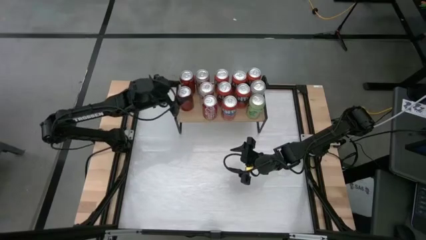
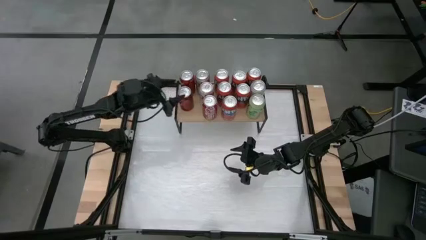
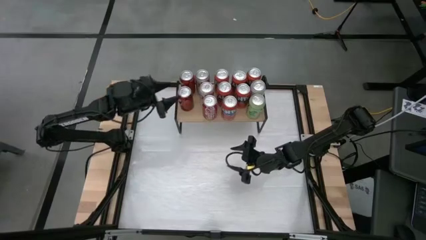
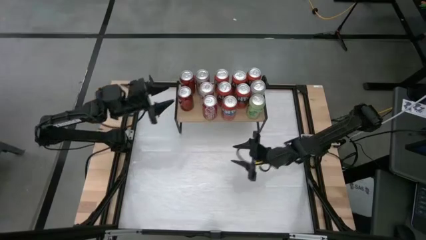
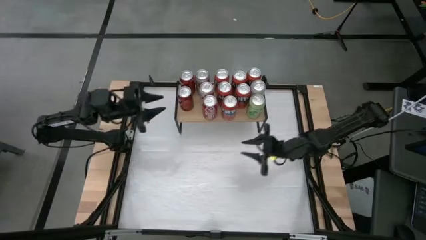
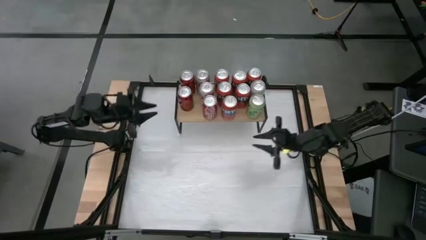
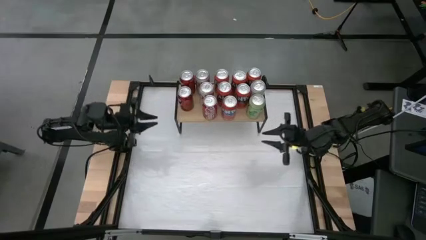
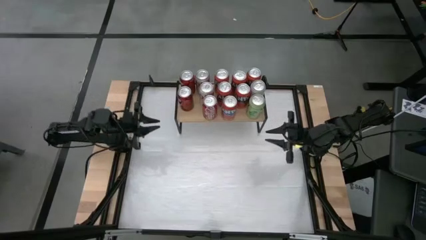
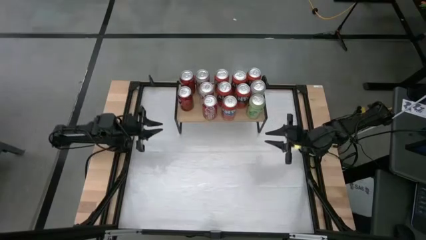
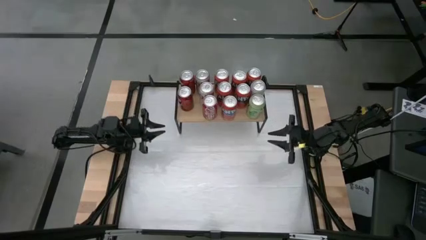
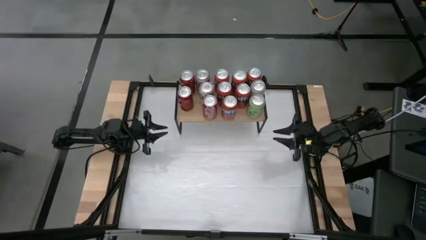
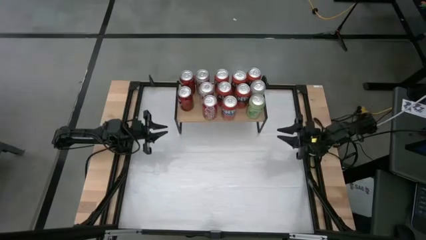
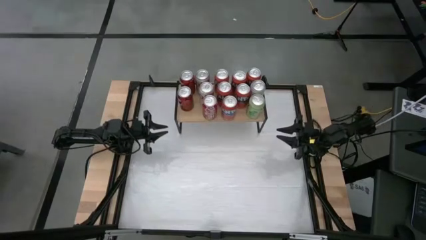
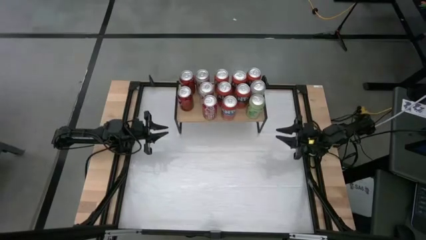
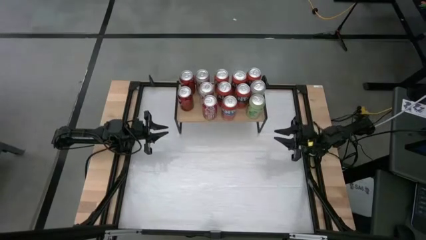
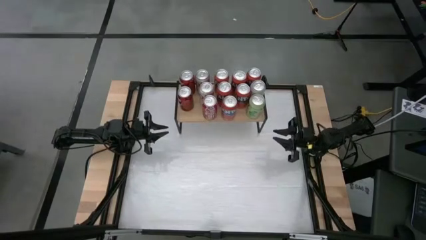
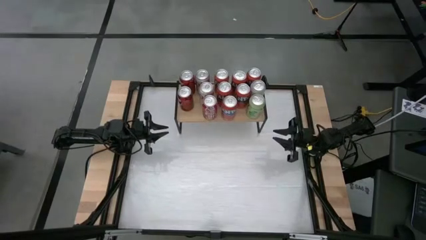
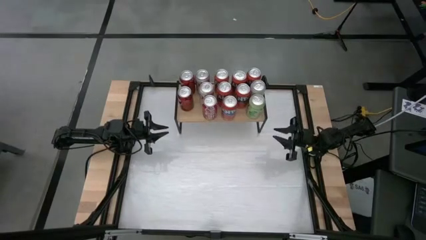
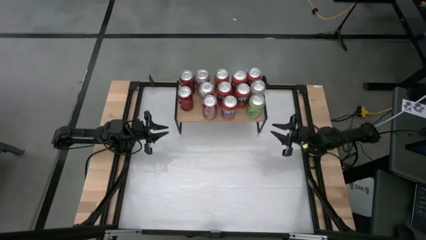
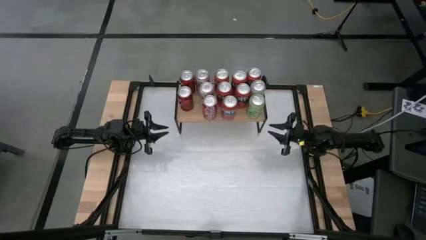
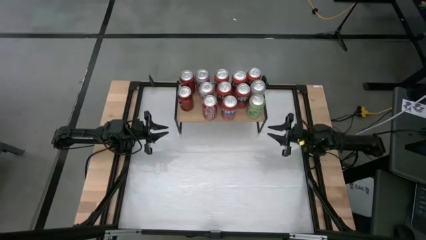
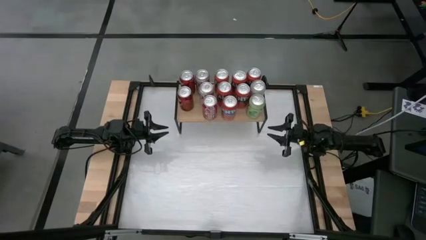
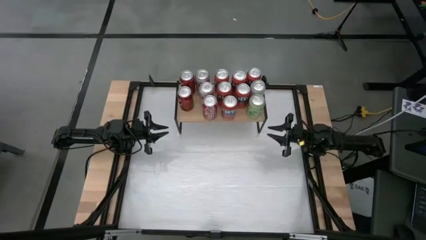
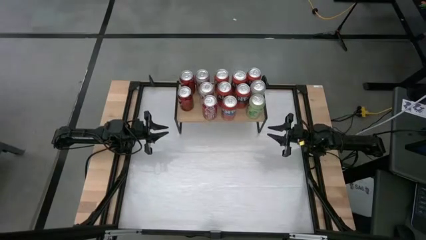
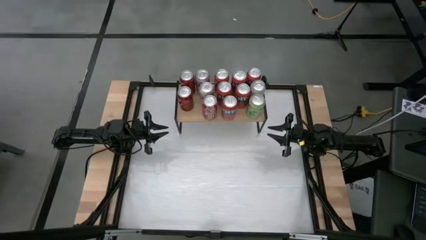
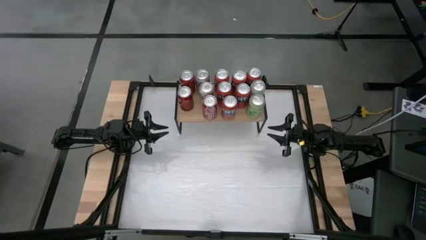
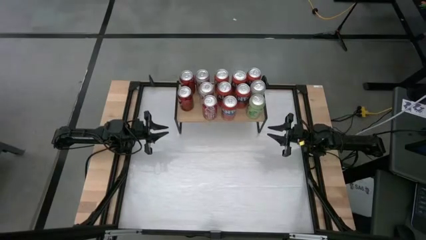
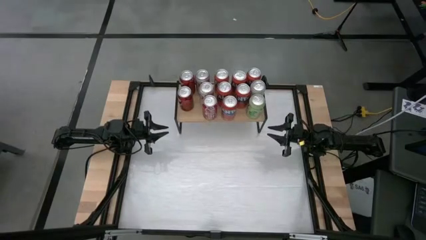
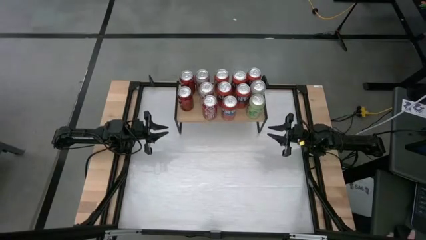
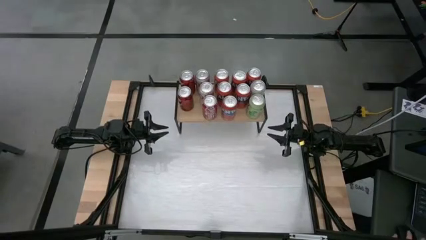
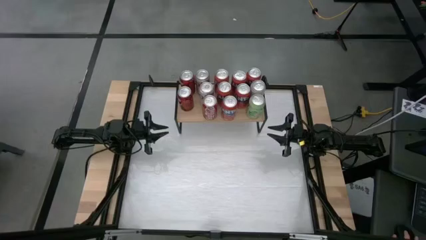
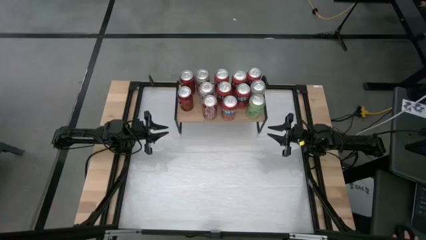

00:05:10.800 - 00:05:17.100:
Task: Place canned beverage on shelf
Return to Home Position

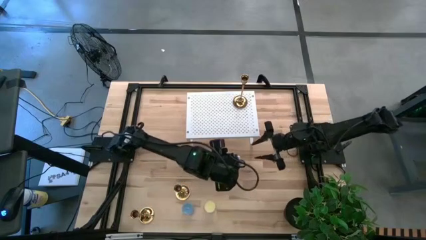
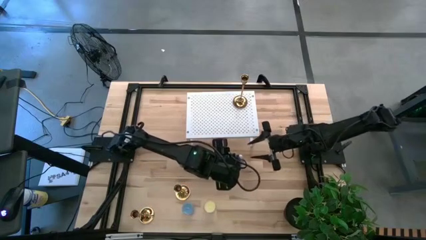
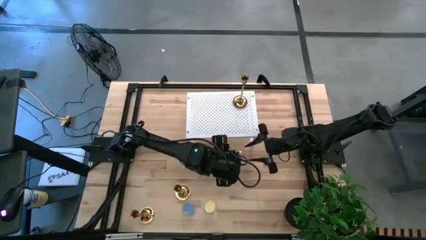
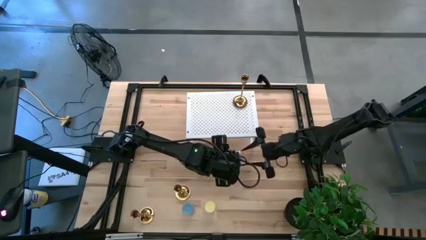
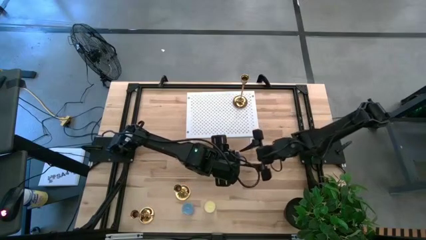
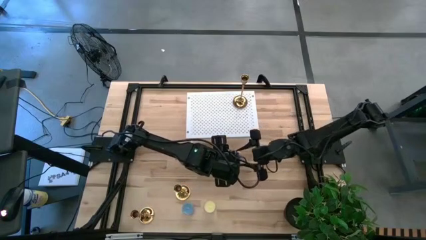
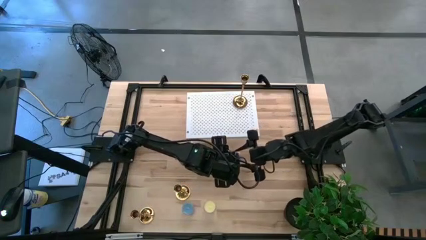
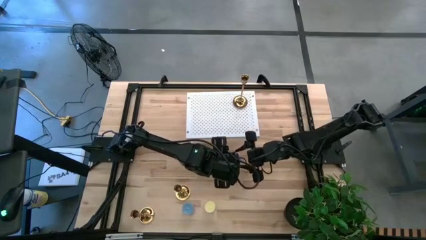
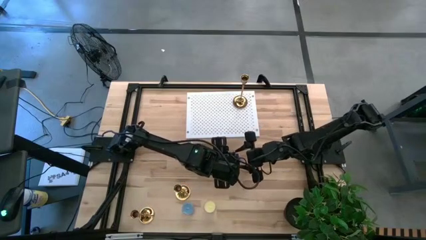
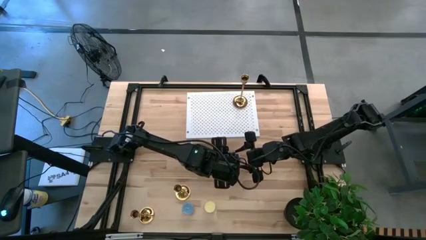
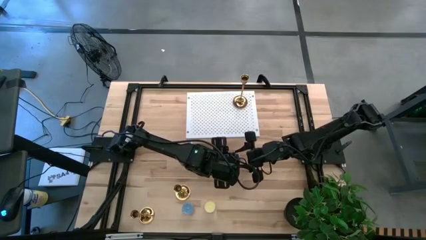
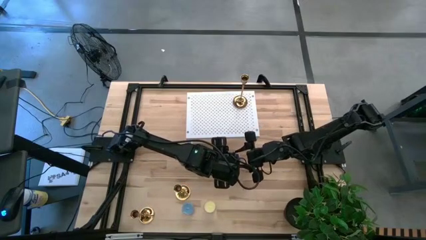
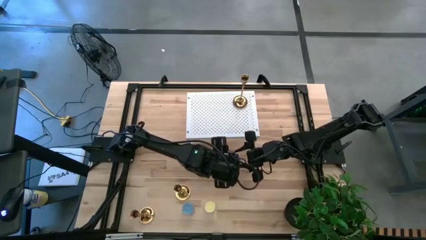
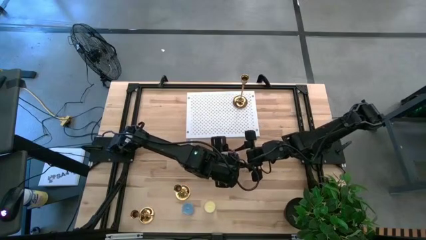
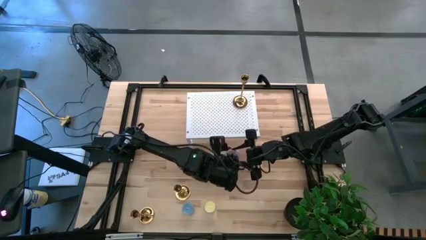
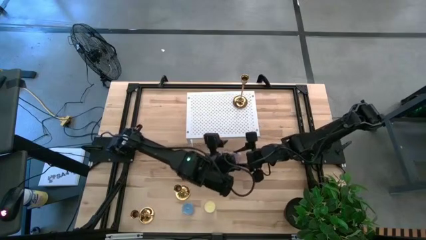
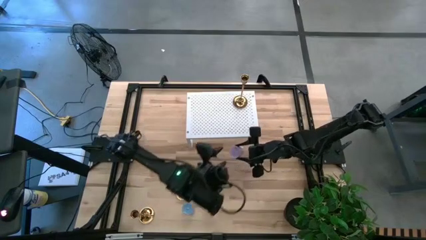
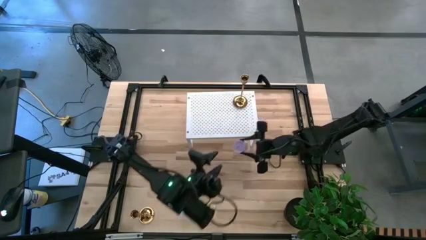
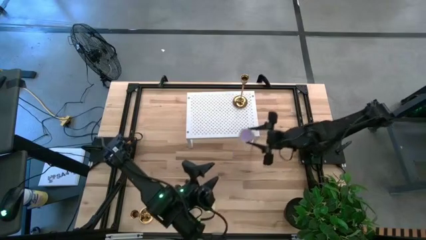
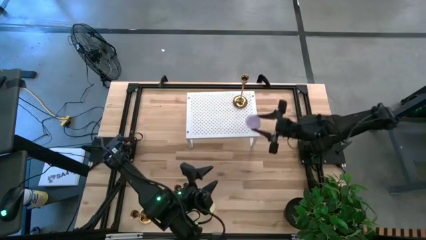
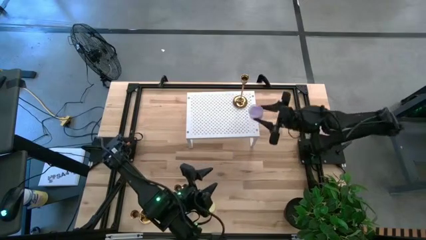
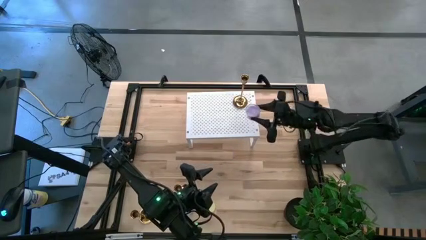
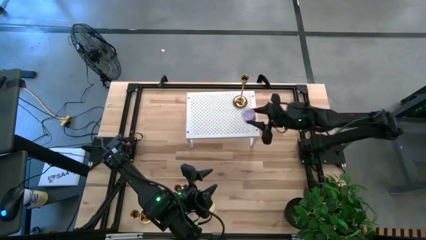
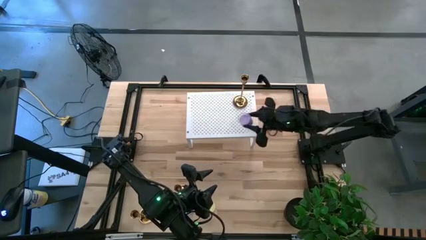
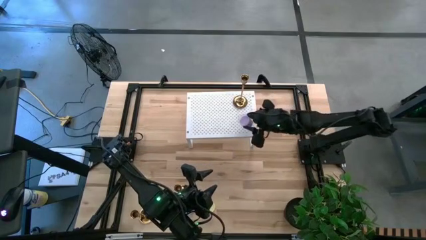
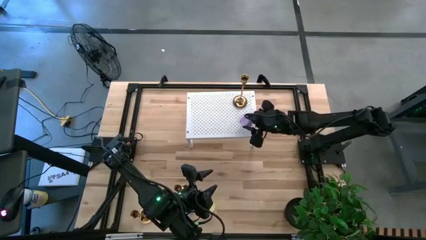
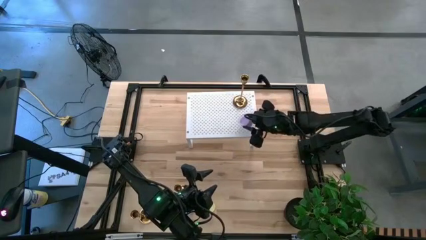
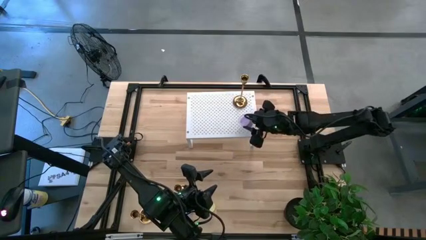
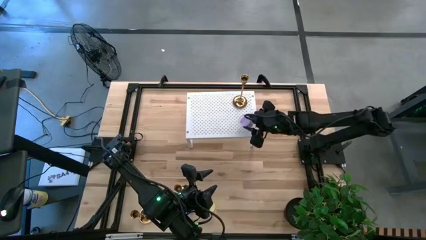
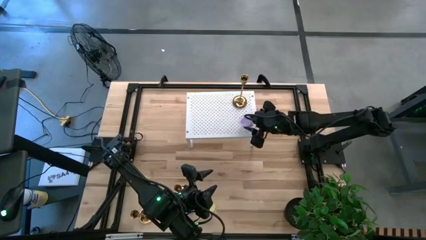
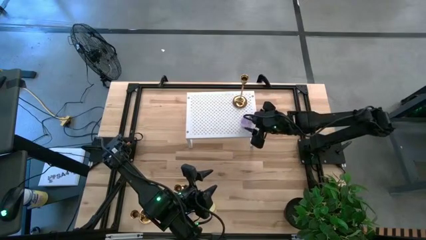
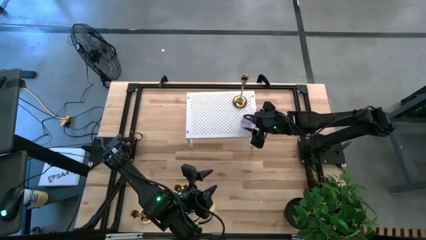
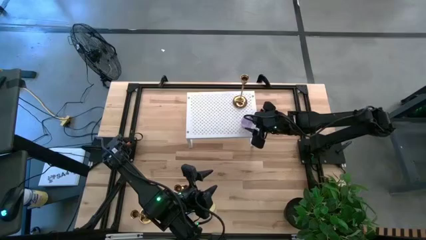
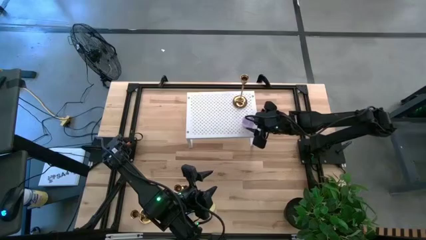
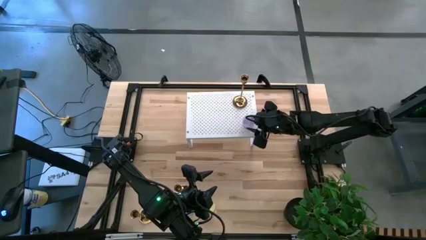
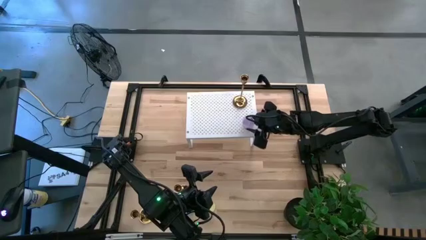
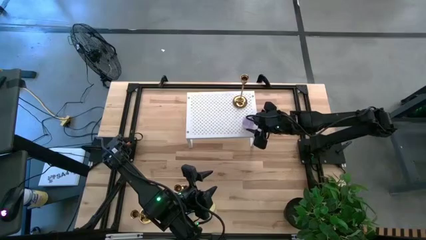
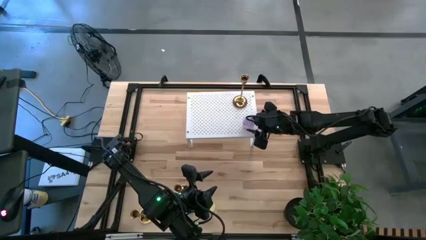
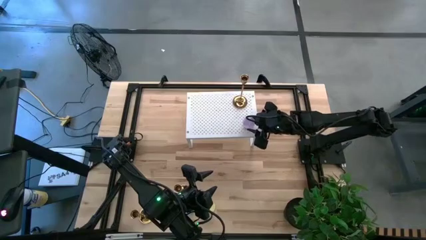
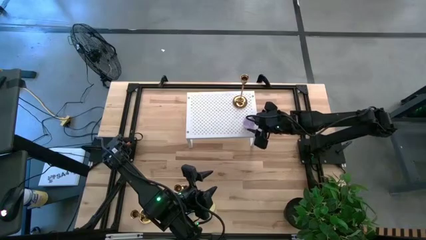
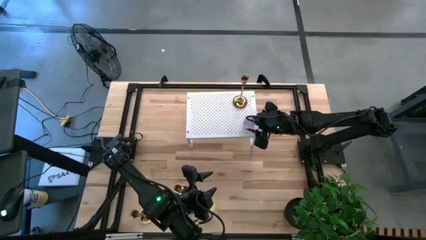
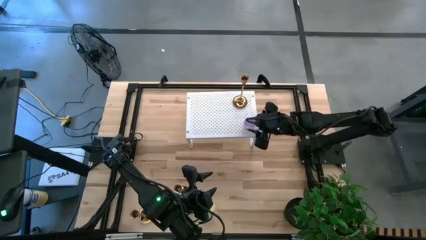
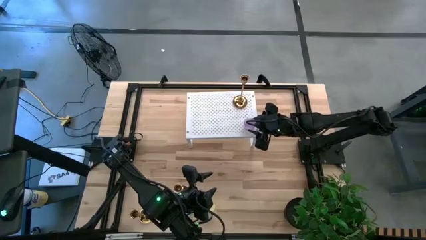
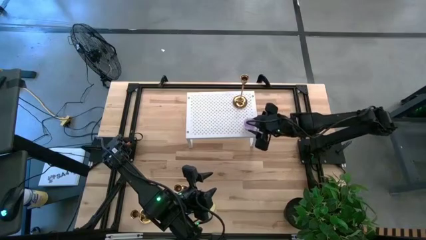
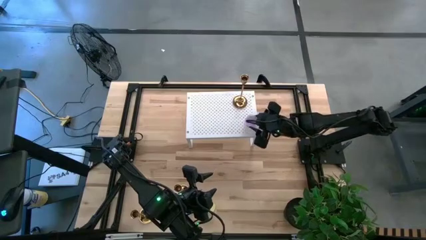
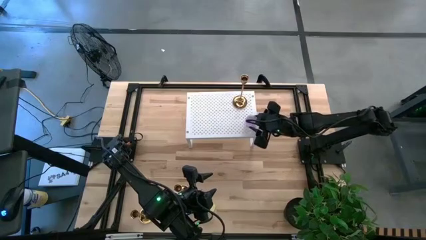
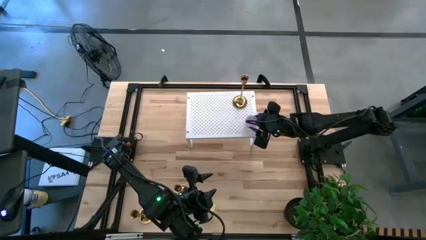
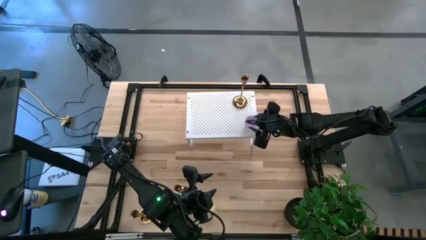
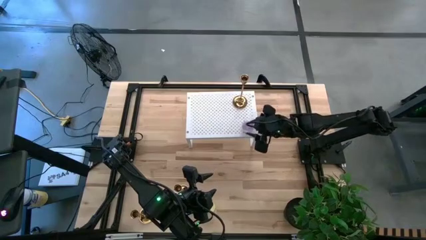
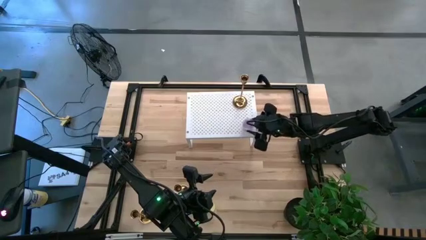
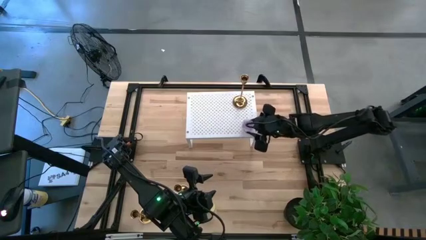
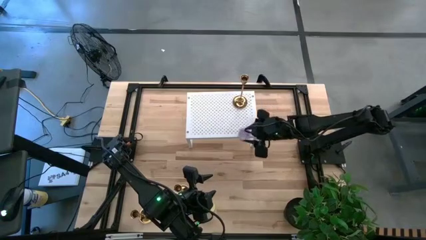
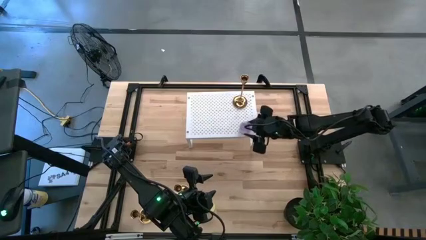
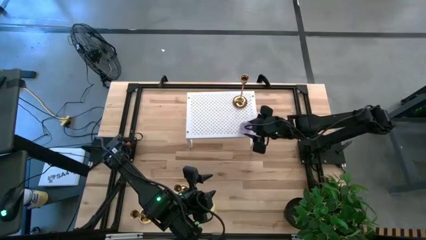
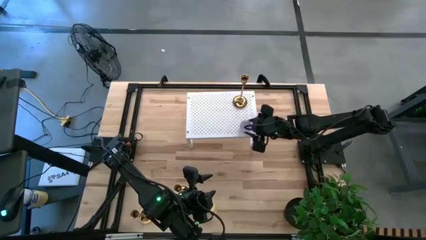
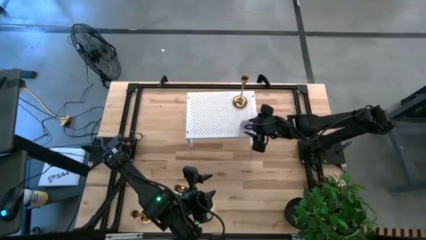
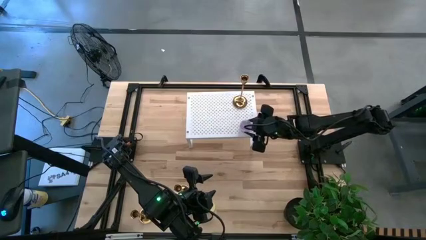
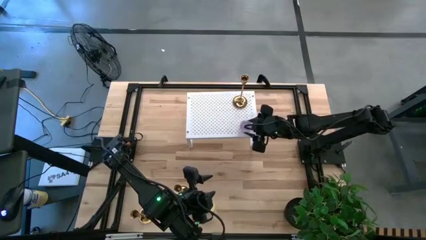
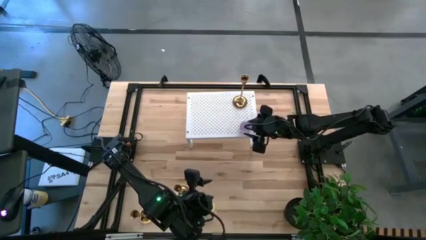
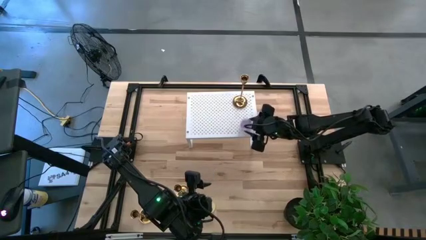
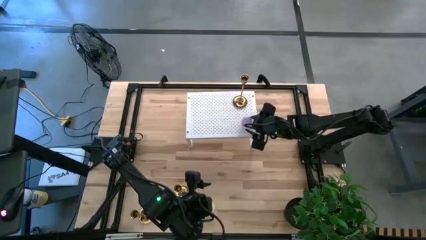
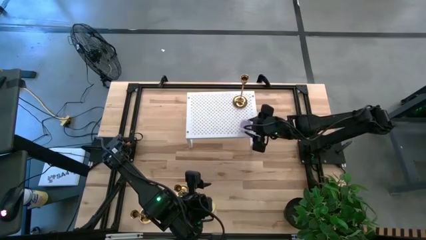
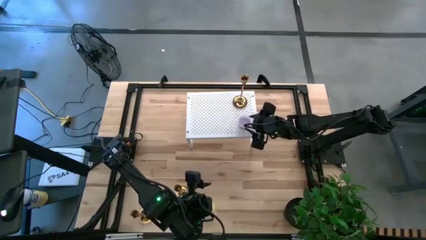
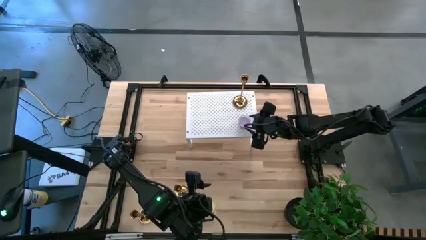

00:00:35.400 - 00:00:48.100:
Task: Pick & Place candle stick holders
Put the violet scented candle on the shelf
